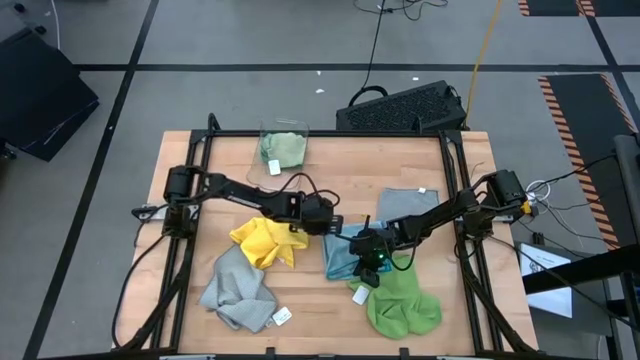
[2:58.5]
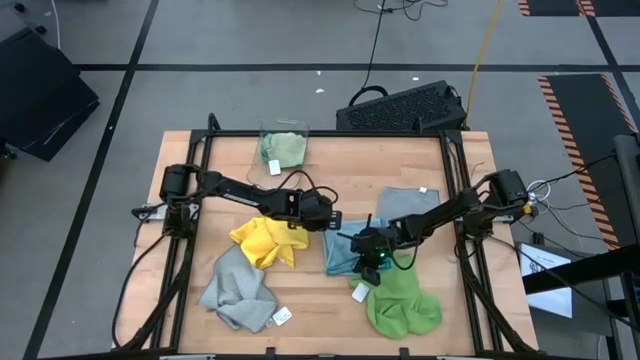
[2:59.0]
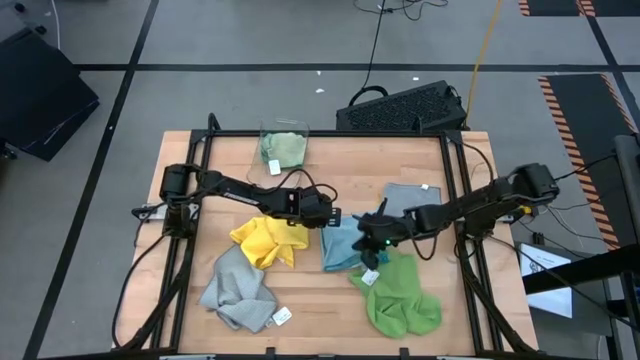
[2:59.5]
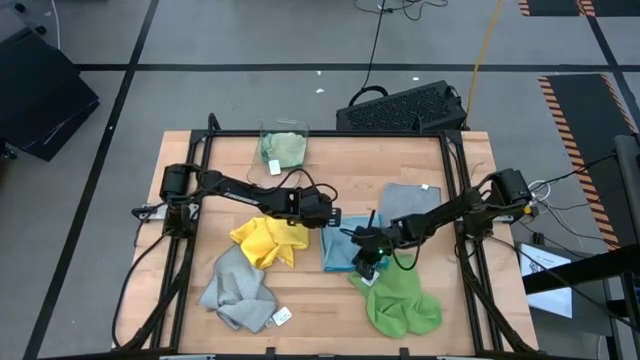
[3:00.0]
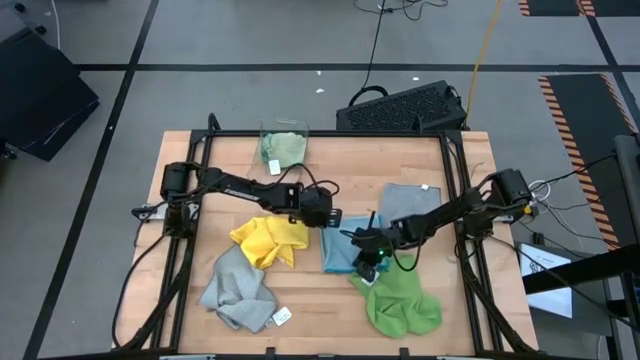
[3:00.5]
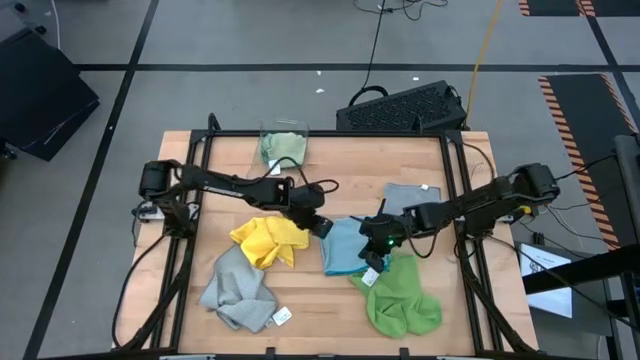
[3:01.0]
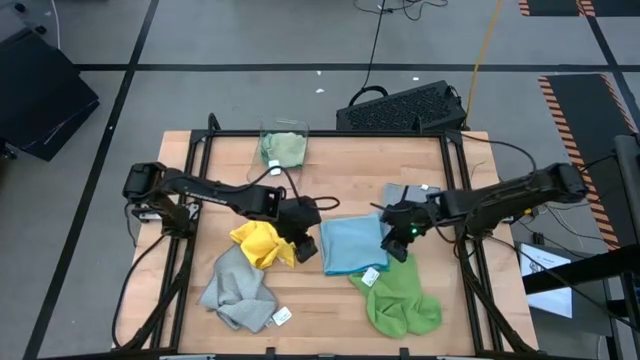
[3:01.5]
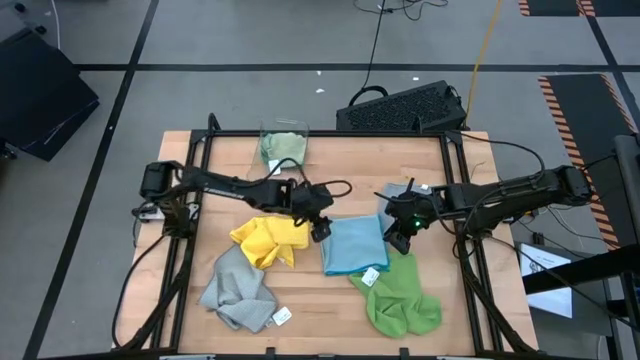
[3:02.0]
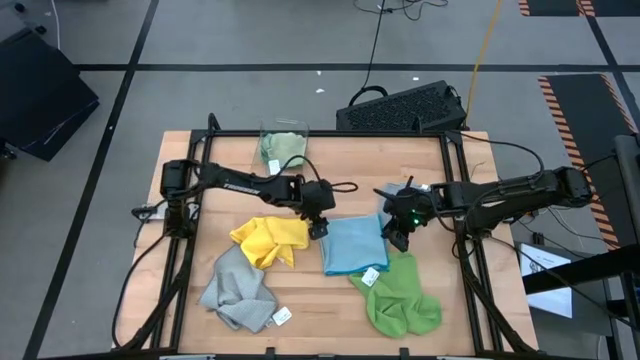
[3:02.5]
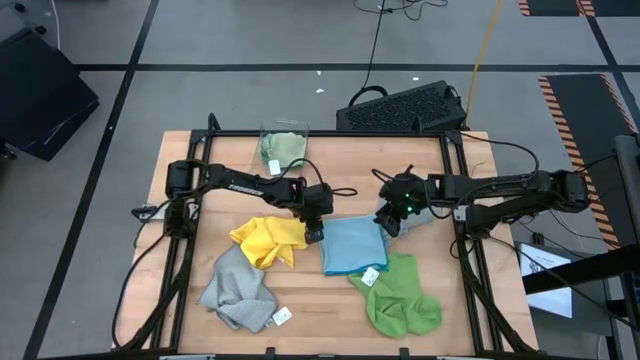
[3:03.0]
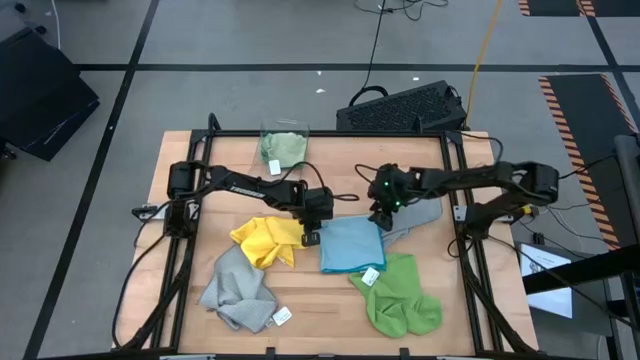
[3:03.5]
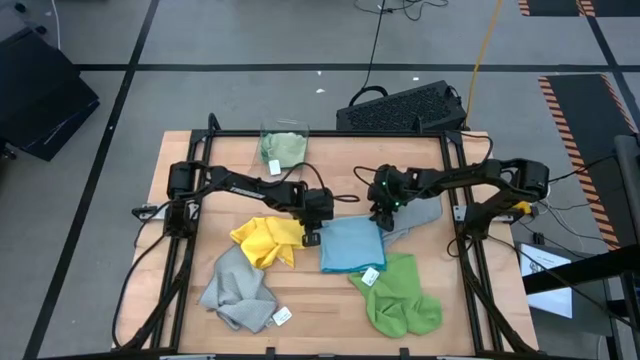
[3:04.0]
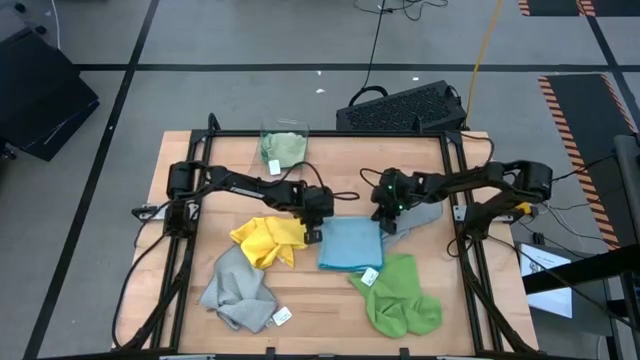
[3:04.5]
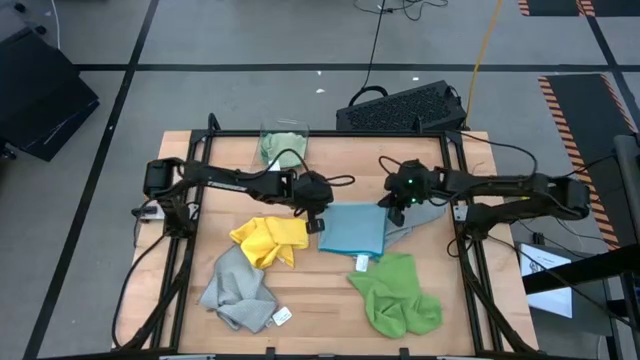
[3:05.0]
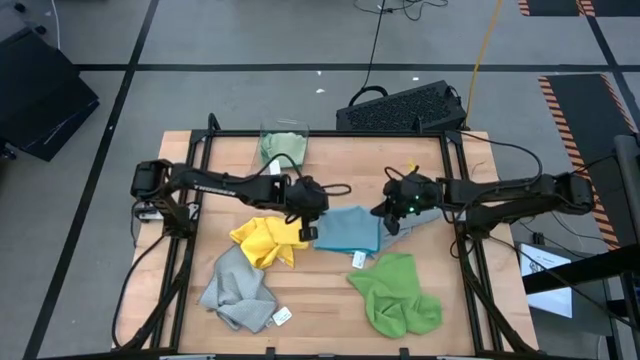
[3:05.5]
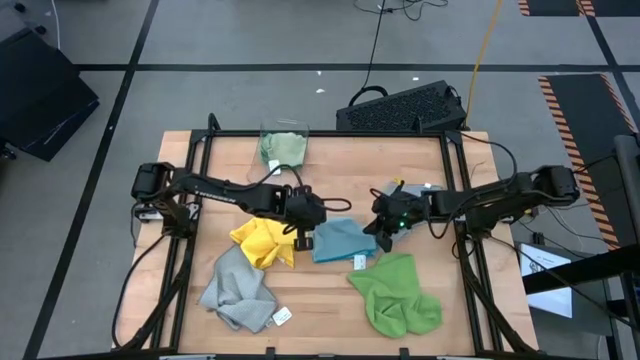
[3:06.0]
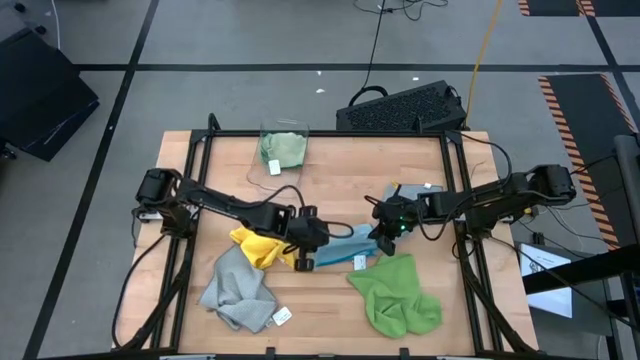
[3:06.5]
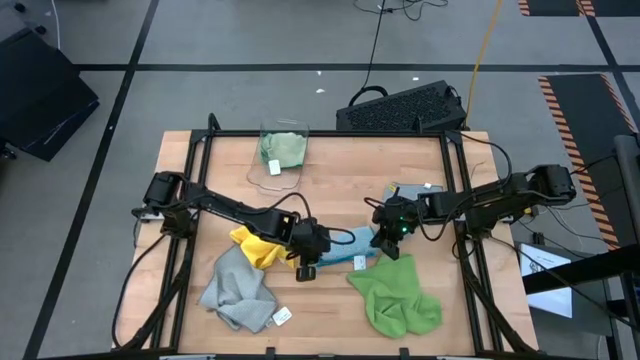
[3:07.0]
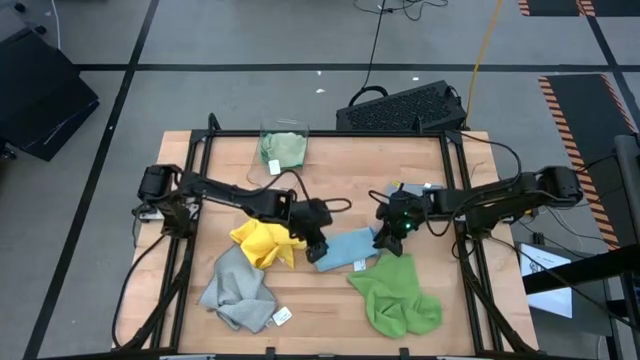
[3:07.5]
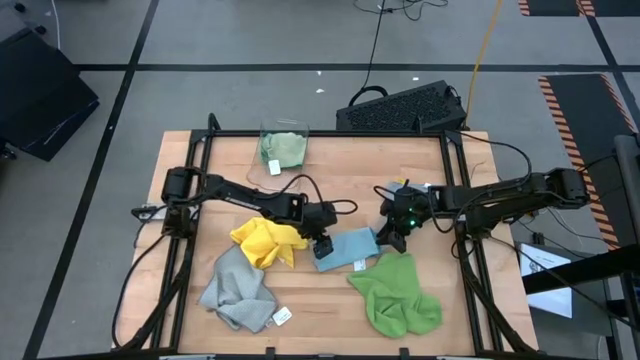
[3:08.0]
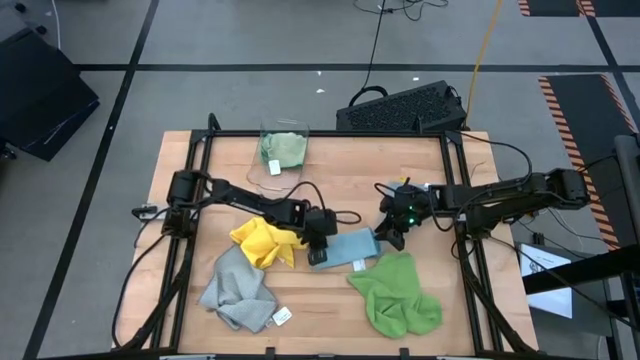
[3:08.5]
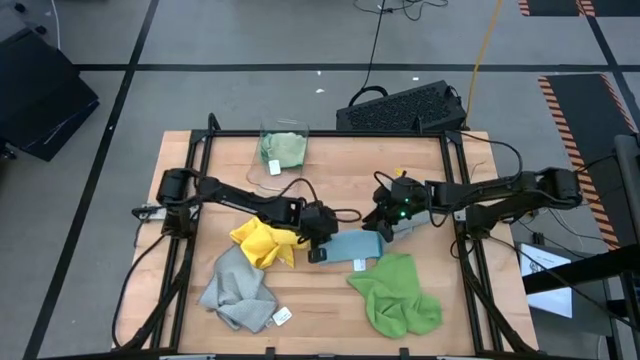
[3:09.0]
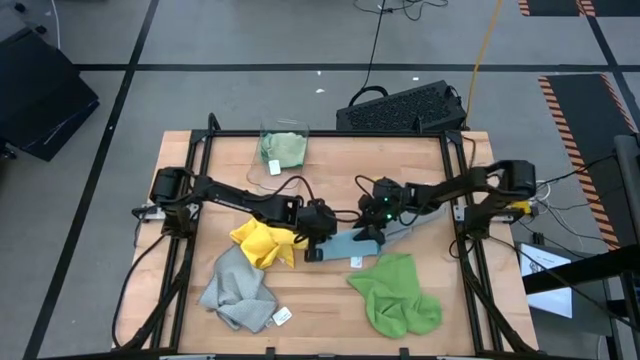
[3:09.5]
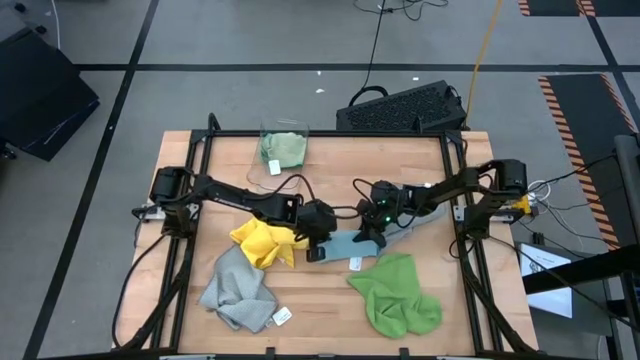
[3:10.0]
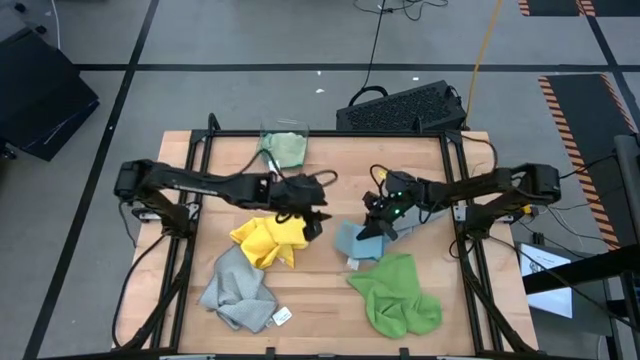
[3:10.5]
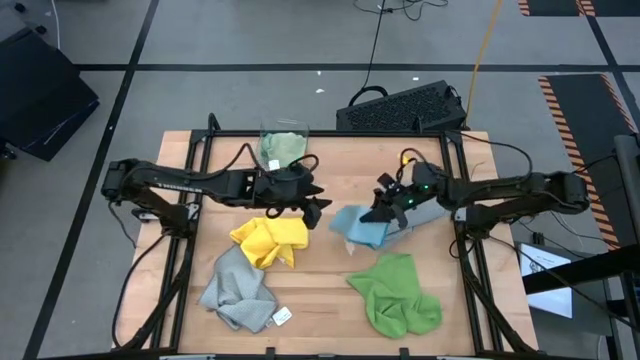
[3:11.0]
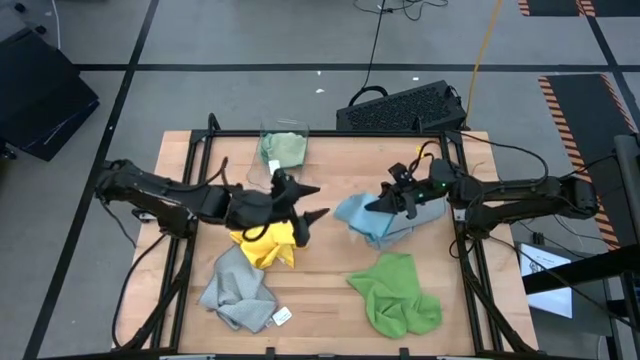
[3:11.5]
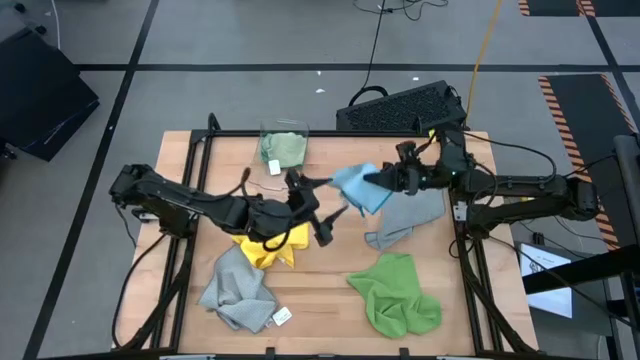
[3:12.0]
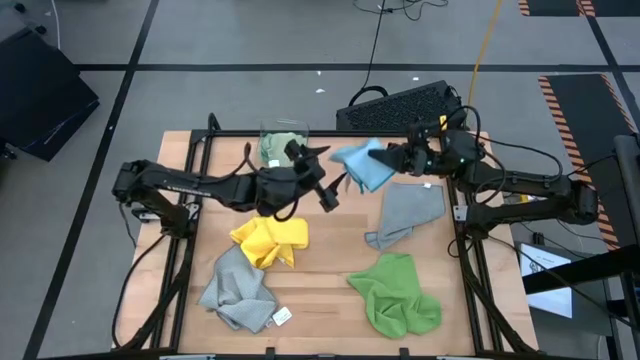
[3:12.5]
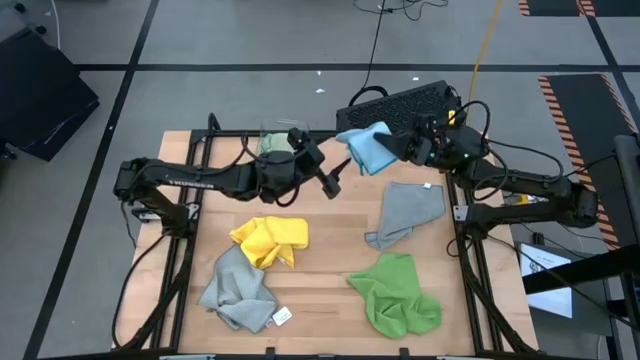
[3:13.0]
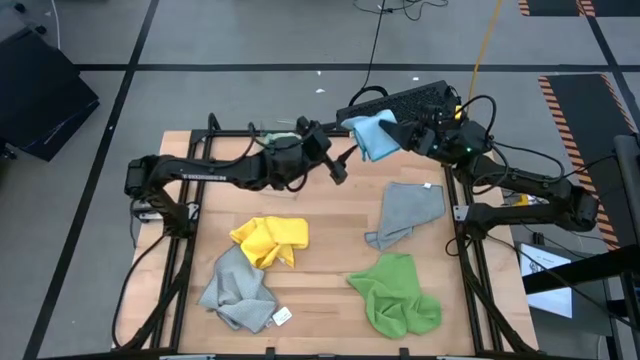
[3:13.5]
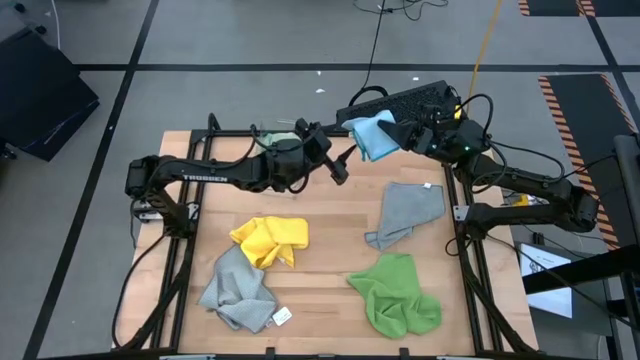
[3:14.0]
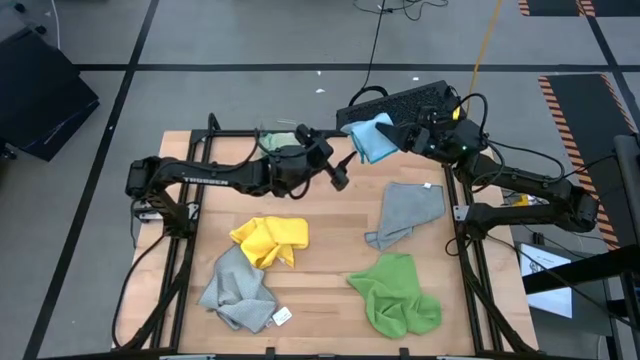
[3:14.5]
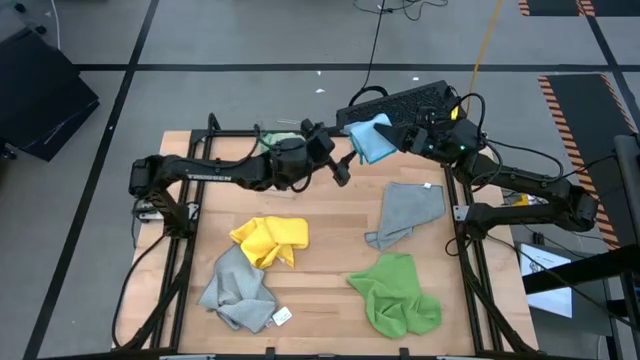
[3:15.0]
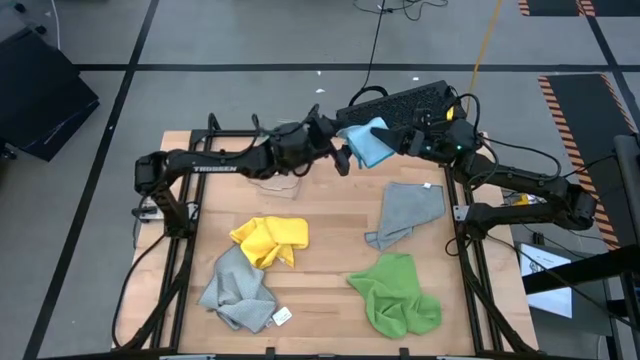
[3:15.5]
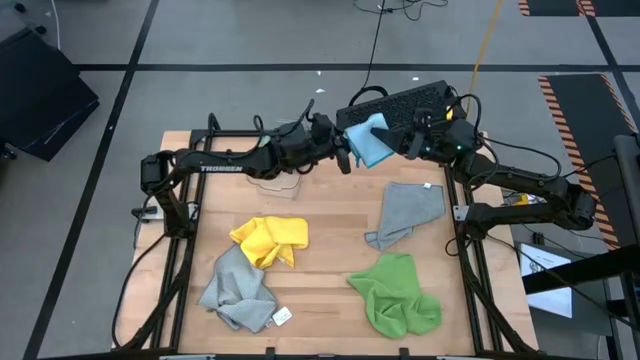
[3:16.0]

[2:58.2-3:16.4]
Task: Fold microfiber towels
Fold the blue microfiber cloth

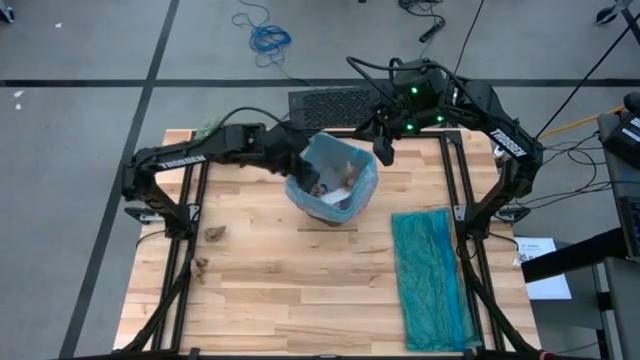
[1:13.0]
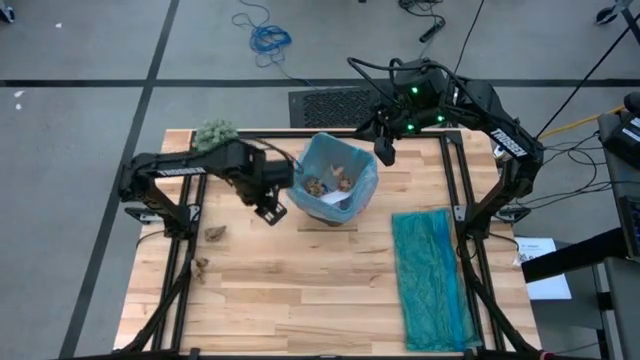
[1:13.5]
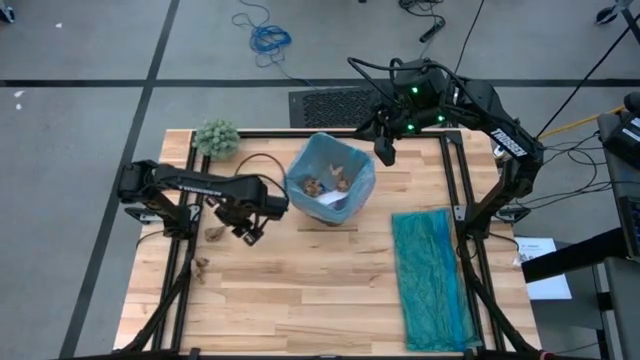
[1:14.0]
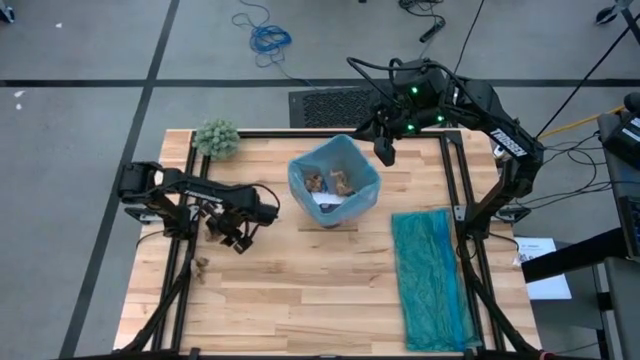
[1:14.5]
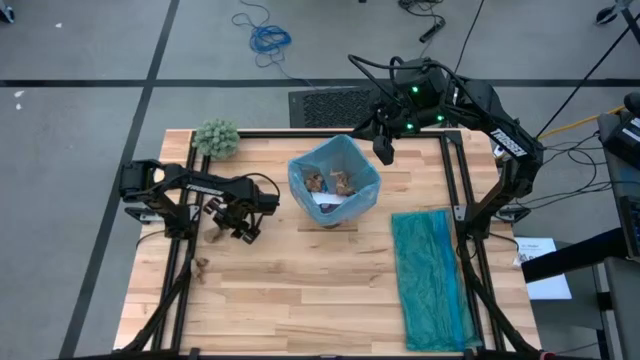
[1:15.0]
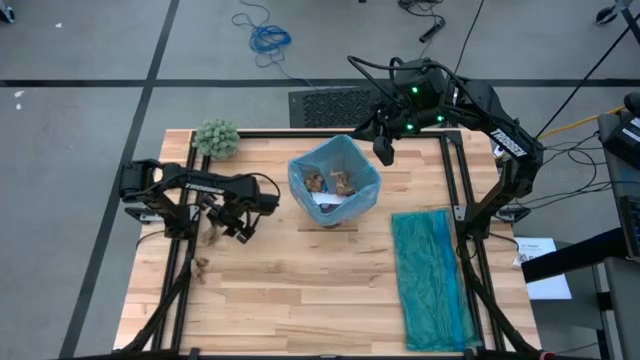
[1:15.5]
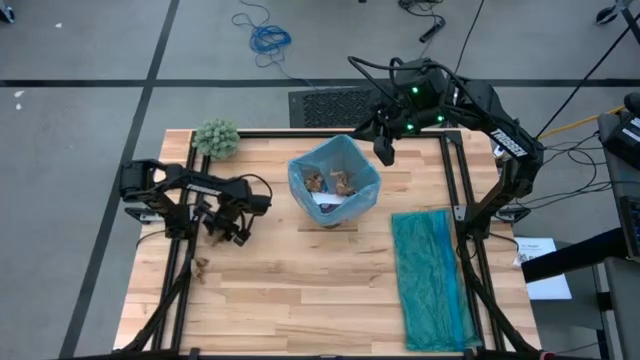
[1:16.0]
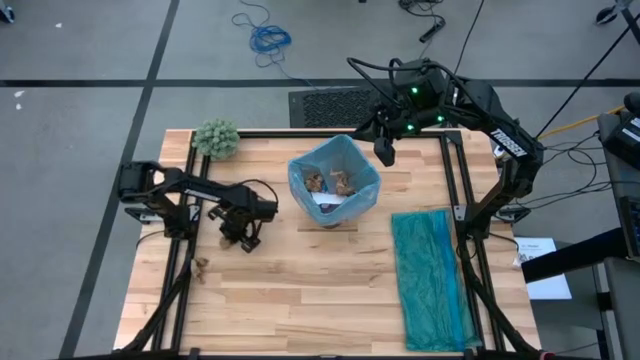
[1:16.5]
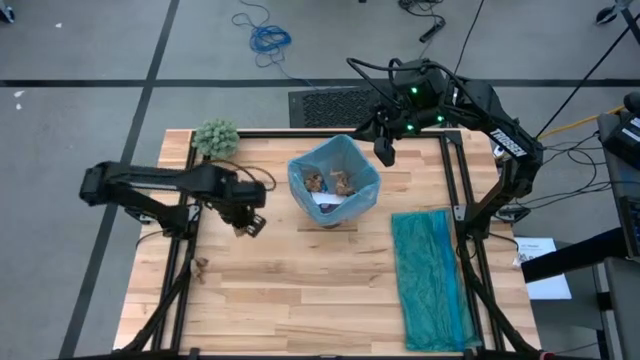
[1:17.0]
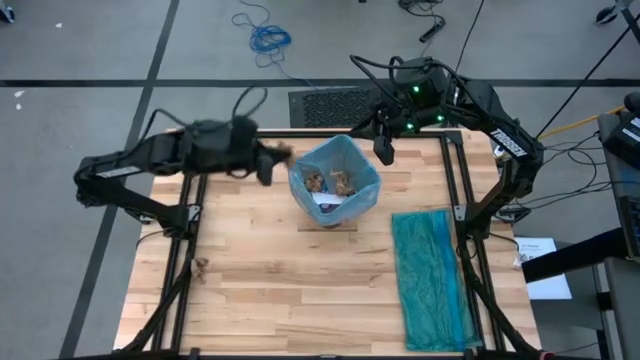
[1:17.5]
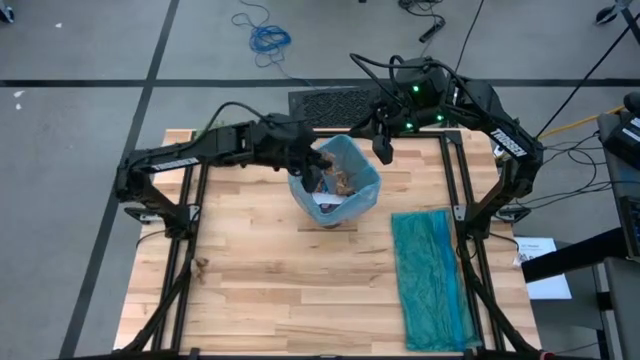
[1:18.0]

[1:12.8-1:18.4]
Task: place trash/remove bag and relplace
Put the brown paper into the trash bin
